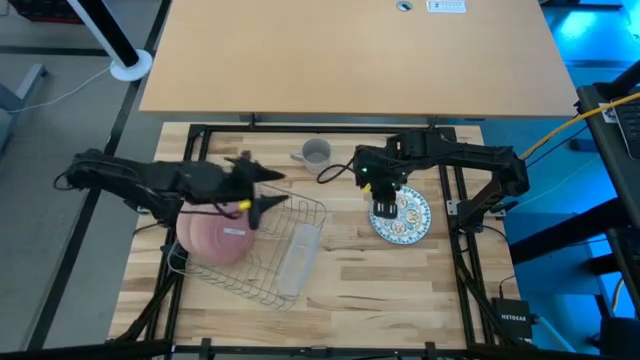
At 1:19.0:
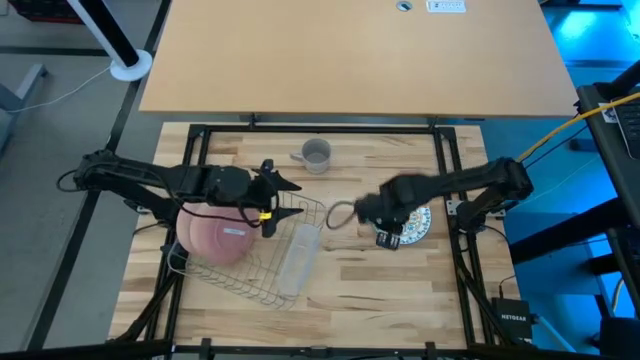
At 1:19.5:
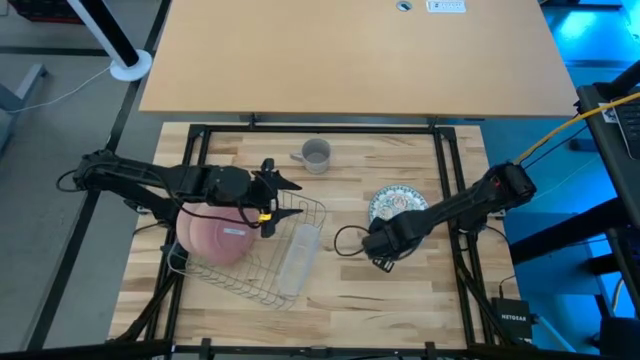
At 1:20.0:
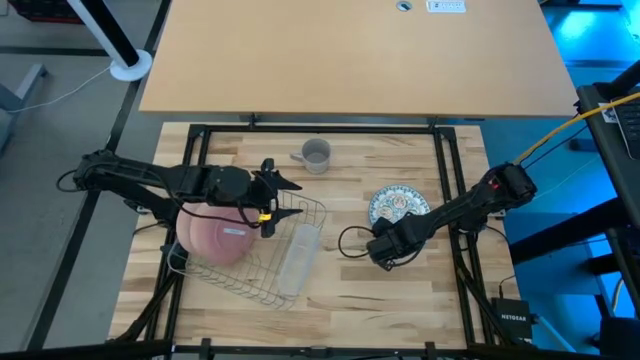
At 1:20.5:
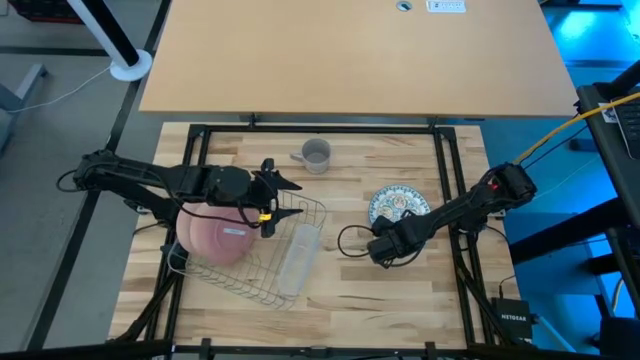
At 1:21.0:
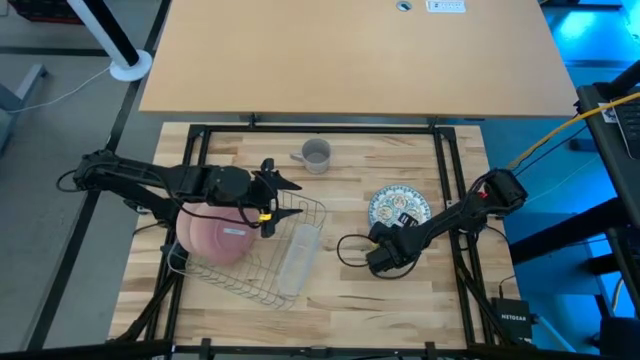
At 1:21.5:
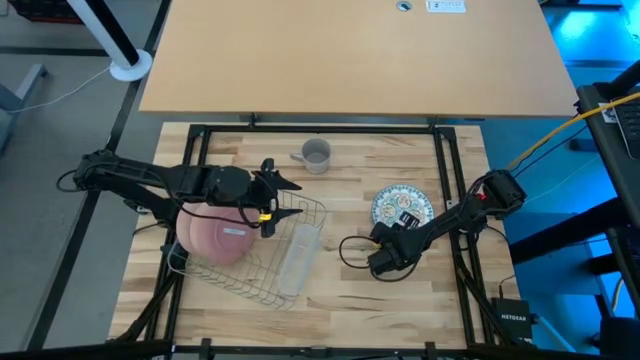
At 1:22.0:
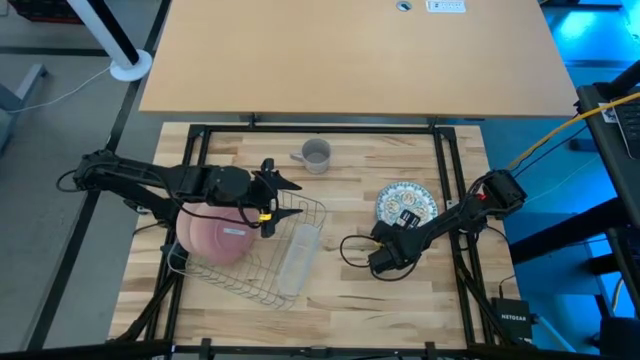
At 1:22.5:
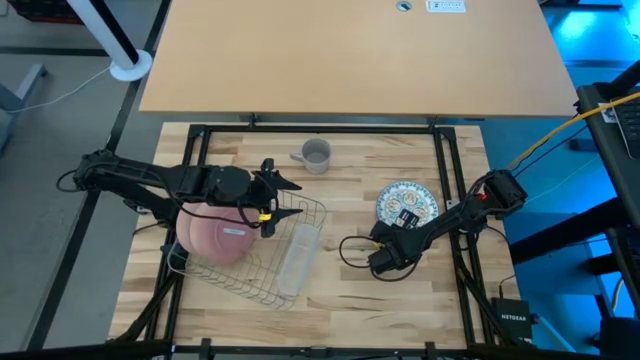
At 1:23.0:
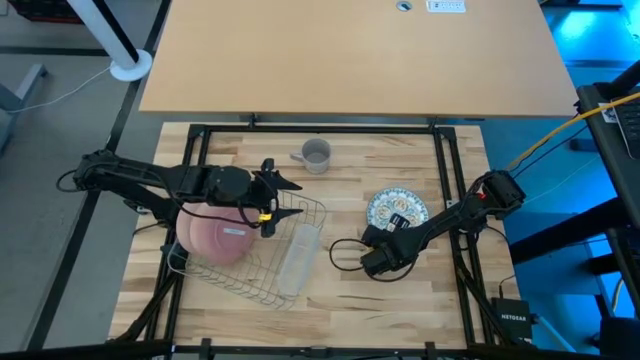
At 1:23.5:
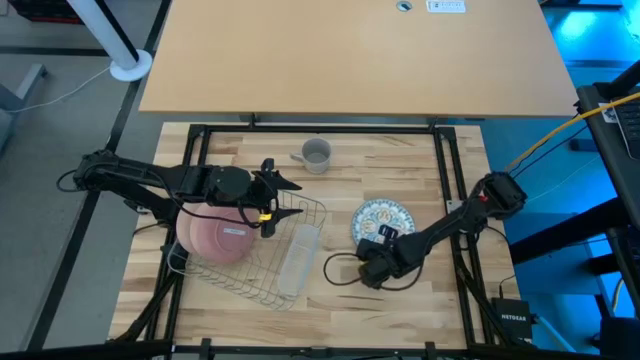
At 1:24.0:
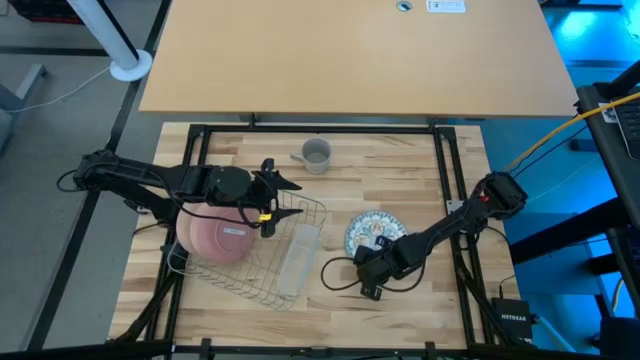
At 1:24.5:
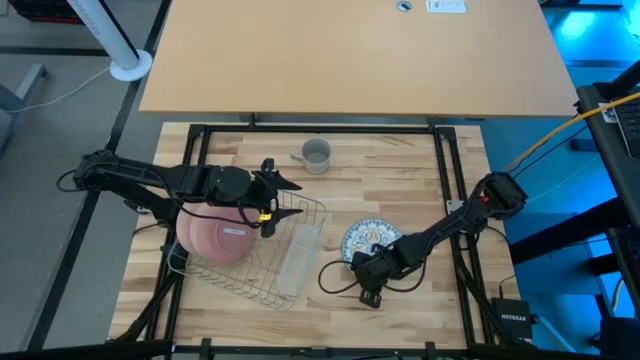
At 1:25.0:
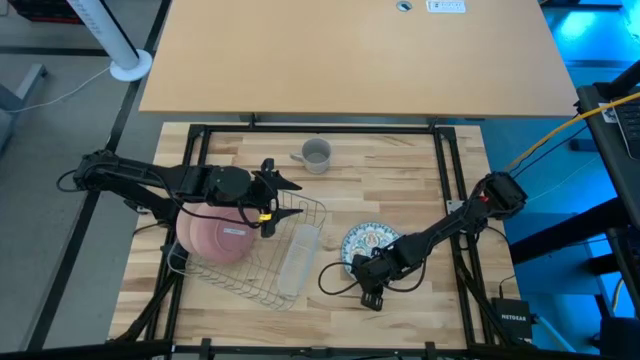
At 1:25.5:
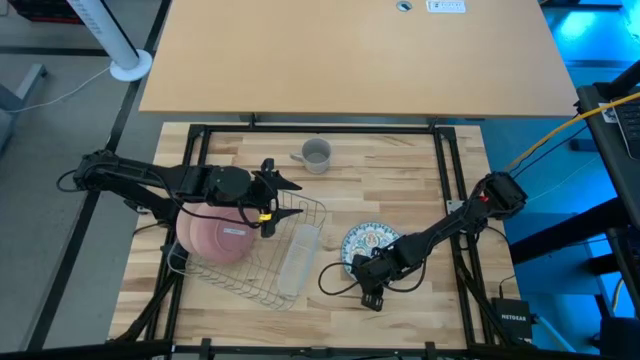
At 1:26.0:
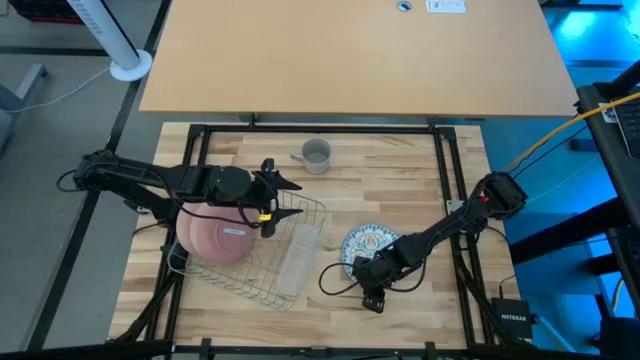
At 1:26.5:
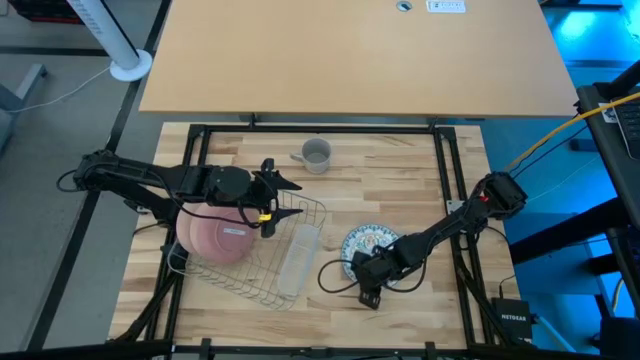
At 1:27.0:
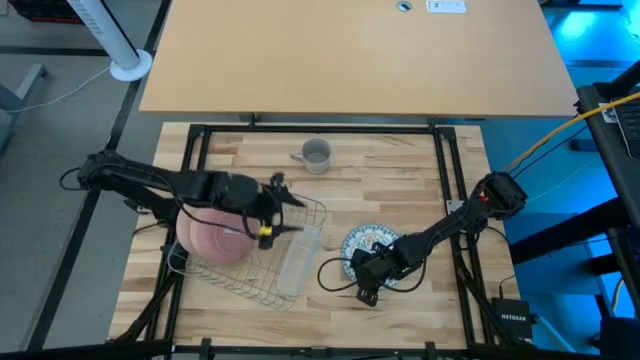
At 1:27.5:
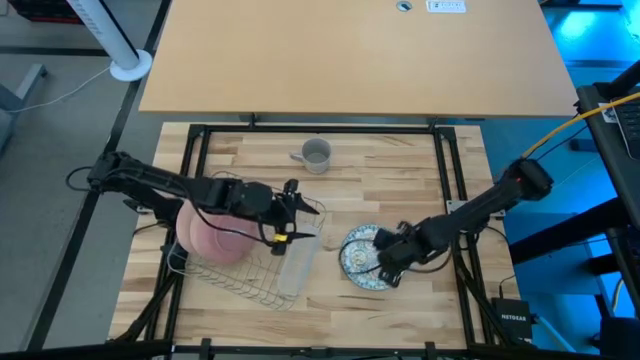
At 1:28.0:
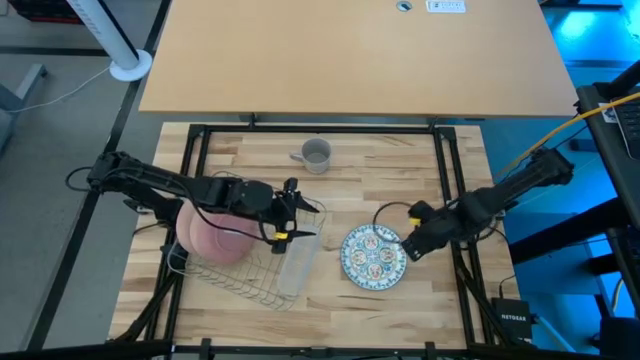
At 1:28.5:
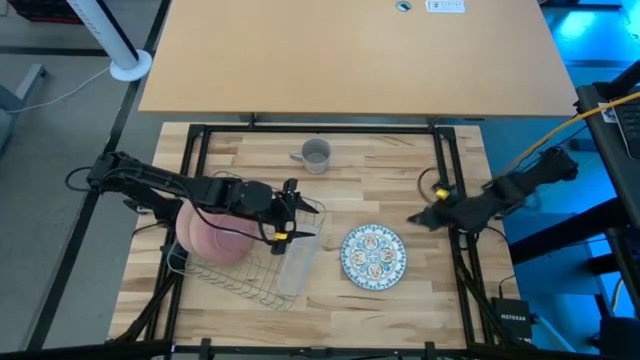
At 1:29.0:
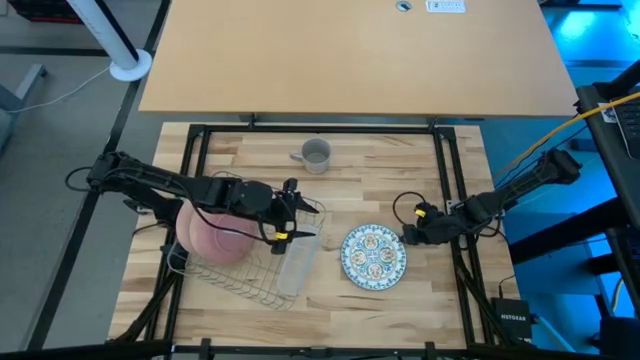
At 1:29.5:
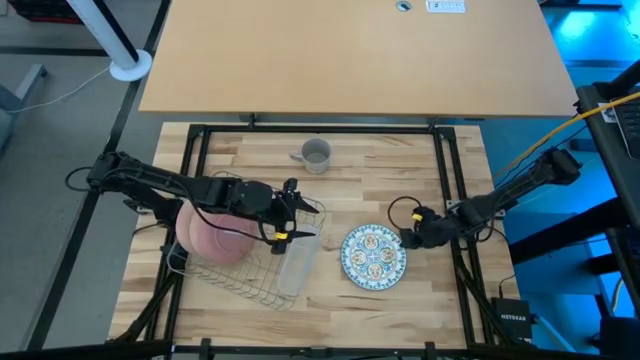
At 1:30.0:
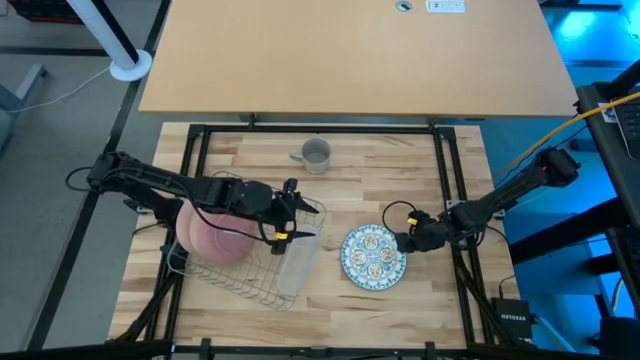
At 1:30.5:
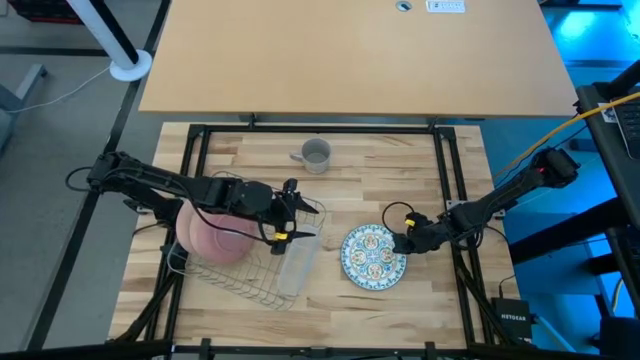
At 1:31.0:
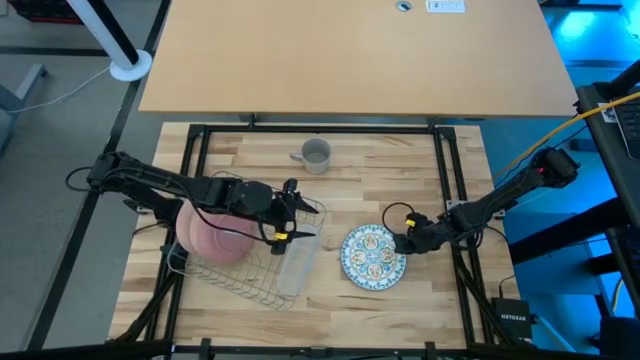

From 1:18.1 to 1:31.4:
Task: Sort dishes
Put the white-blue plate in the dish rack

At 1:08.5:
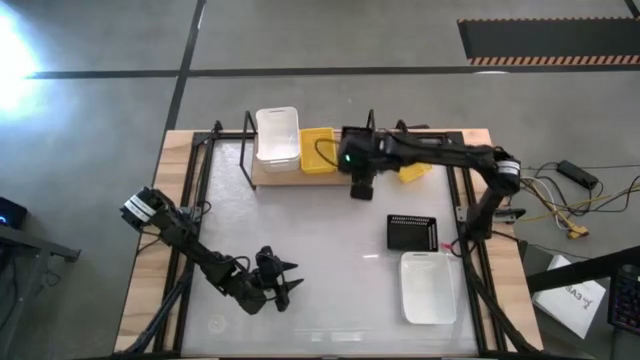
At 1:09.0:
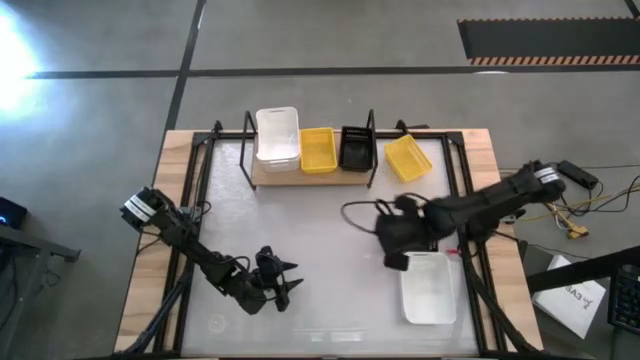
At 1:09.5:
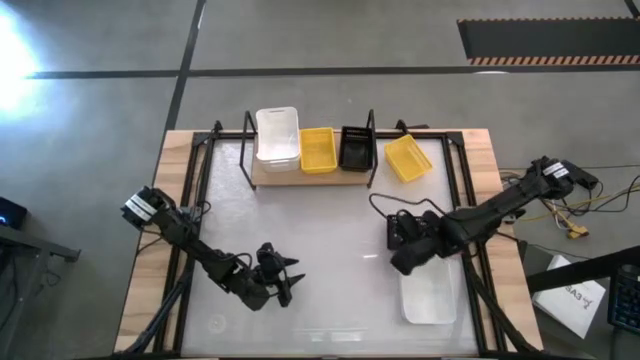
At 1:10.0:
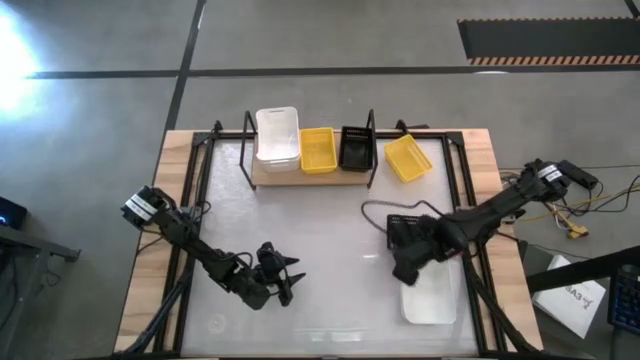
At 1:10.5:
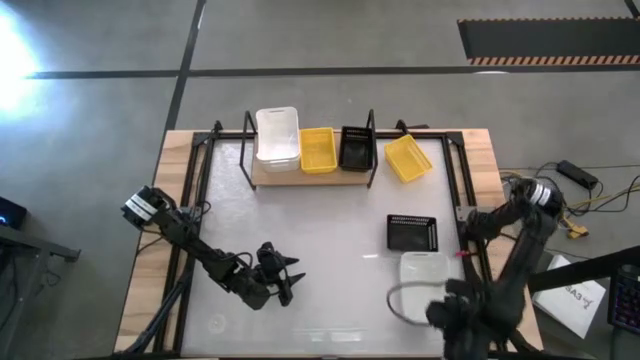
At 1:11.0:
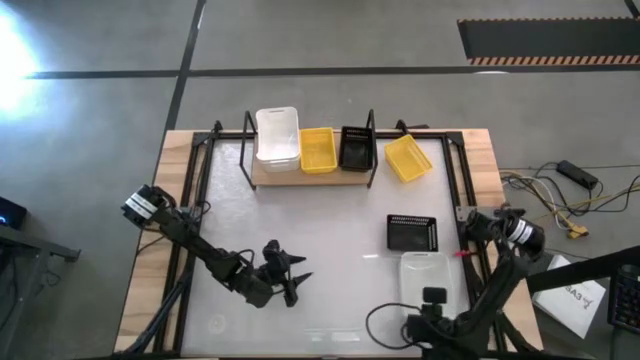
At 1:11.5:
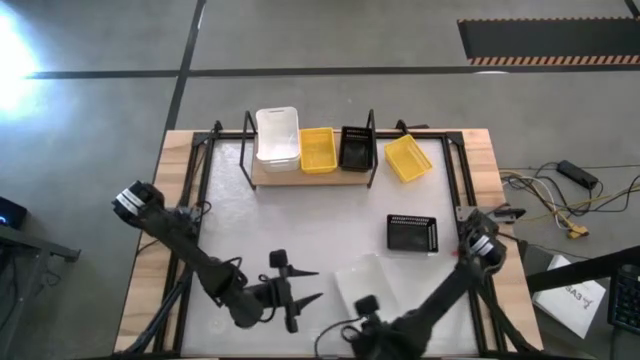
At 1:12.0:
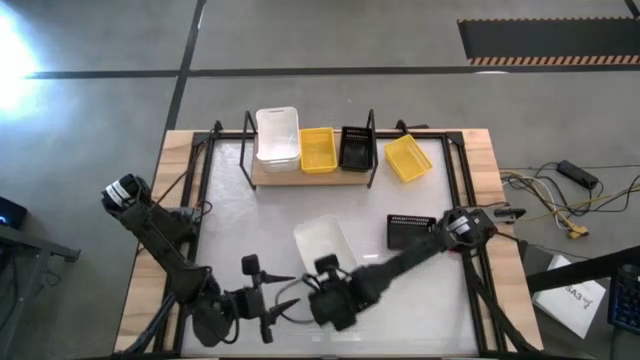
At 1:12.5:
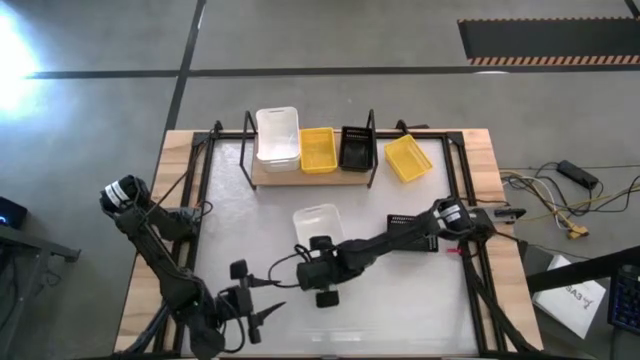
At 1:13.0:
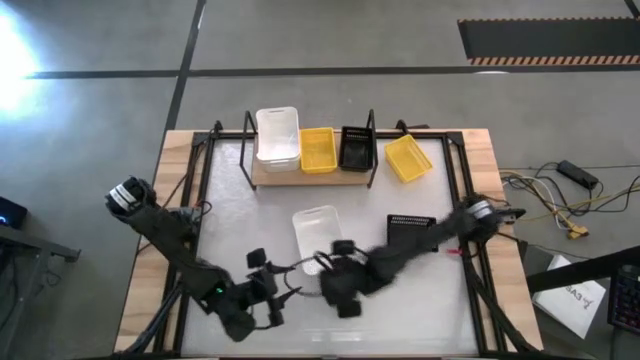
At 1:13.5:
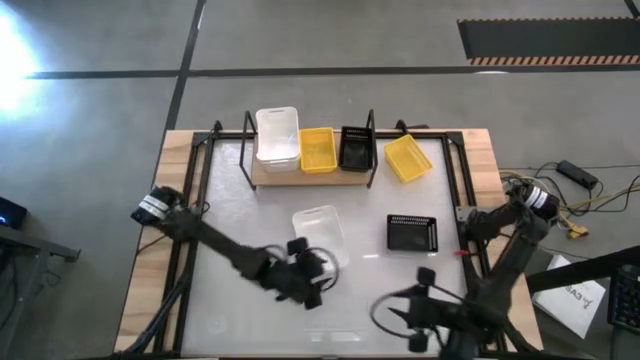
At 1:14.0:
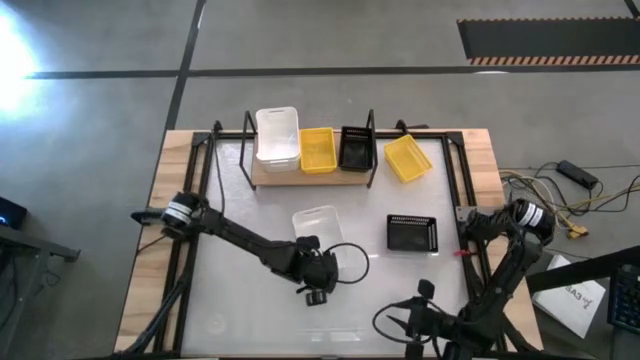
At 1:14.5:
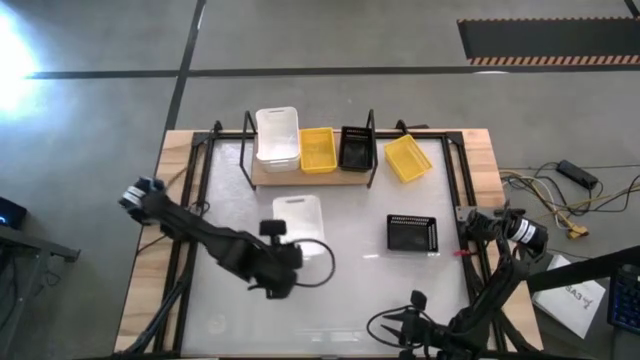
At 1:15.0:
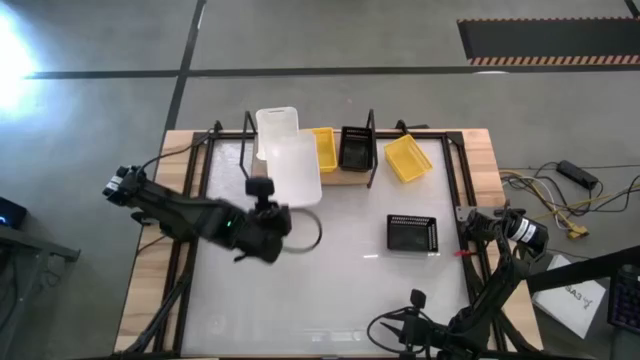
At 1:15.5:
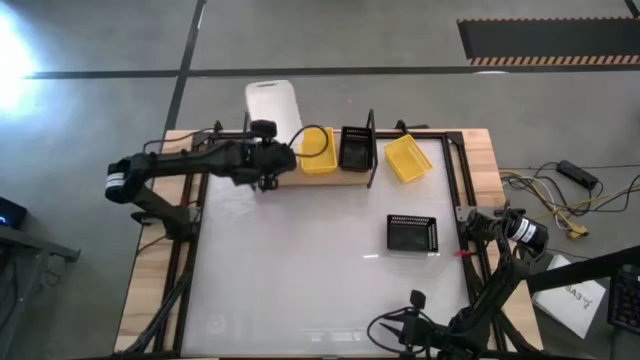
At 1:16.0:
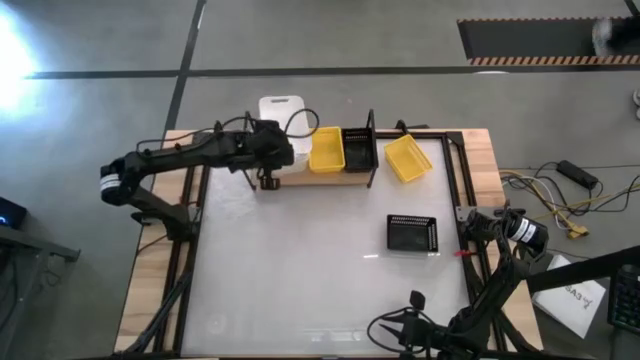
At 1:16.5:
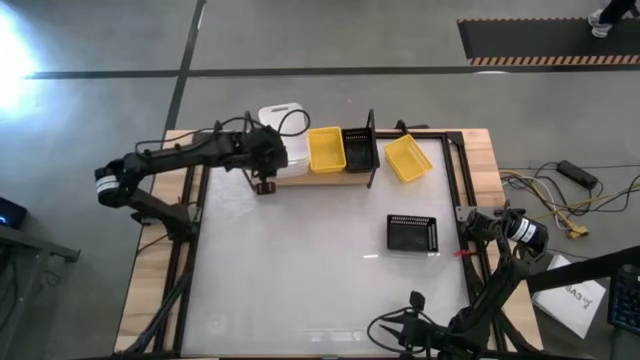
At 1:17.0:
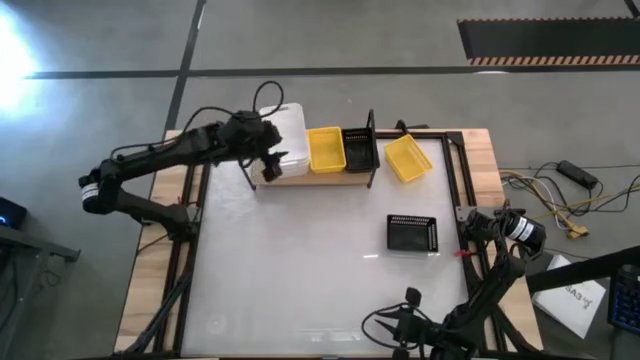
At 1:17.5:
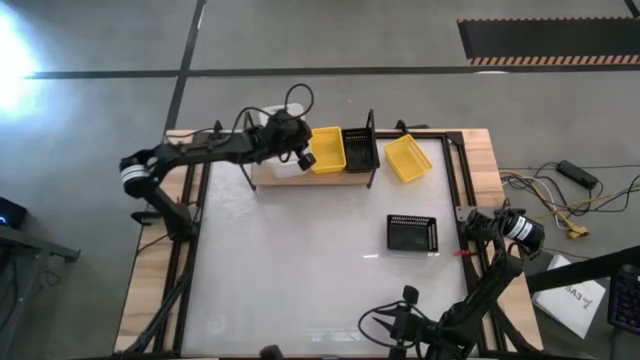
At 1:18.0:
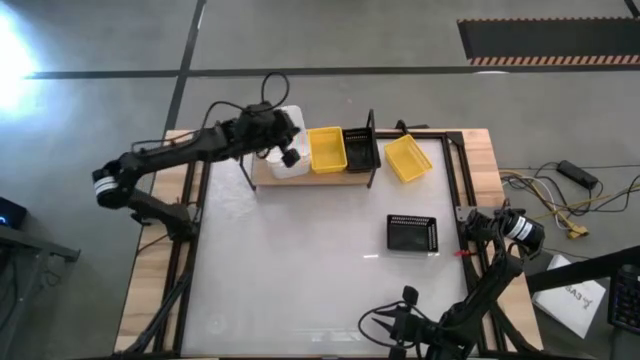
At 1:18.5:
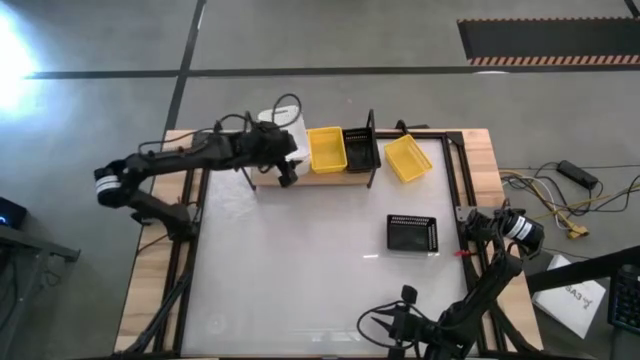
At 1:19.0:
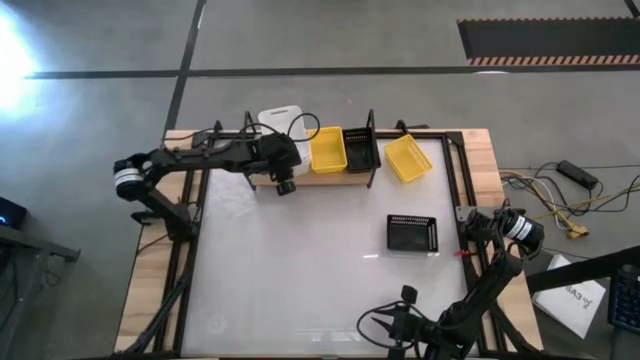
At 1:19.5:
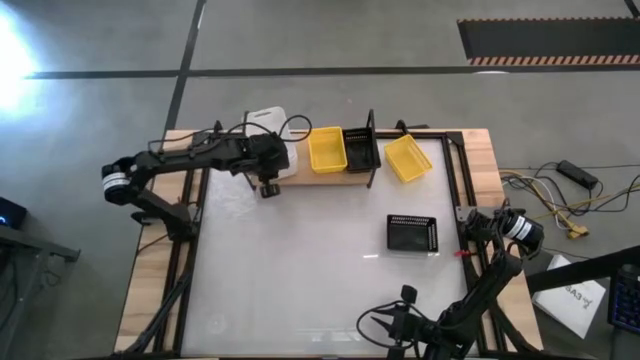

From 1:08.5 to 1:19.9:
Task: Stack baskets on shelf by color
Stack the white bin on top of the white bin on the shelf
